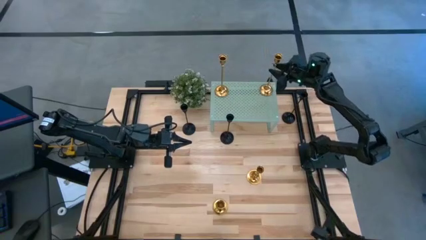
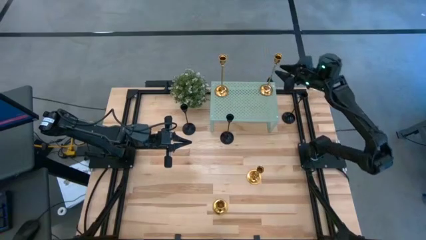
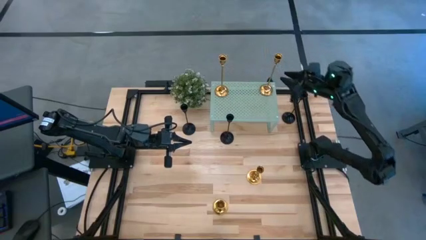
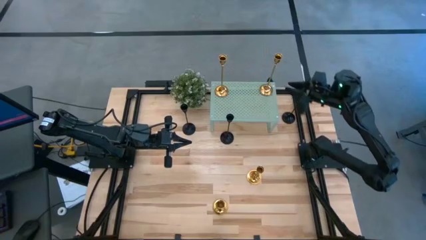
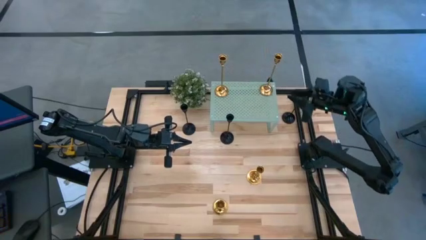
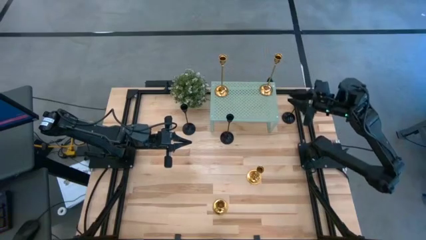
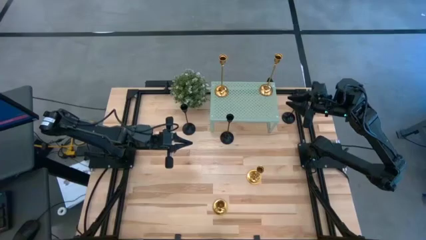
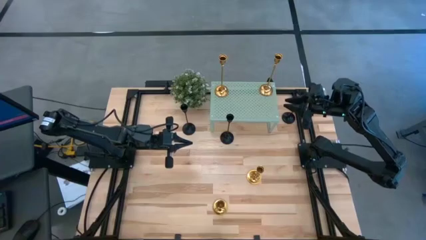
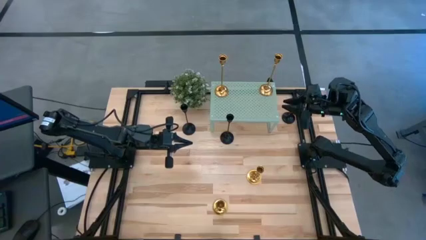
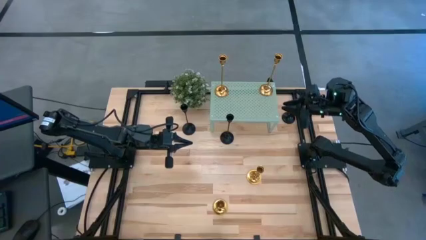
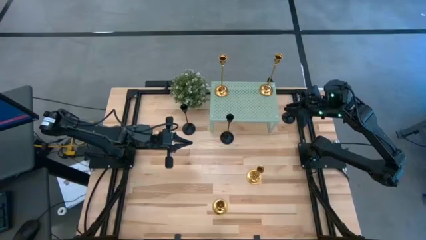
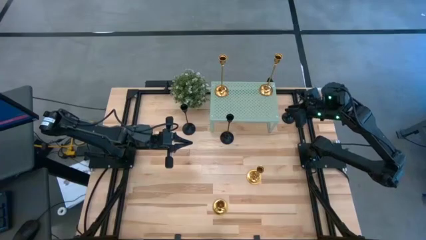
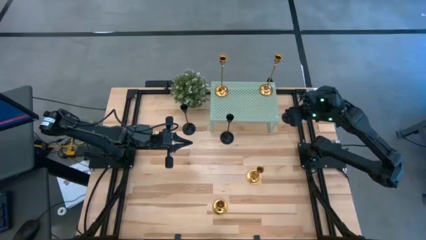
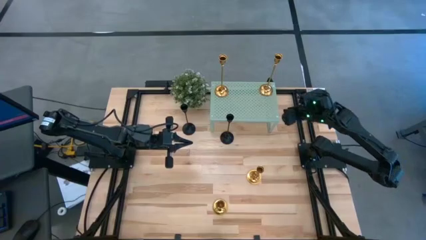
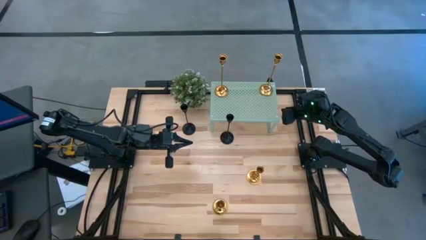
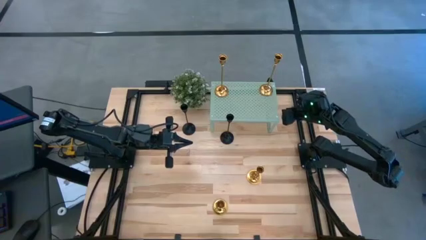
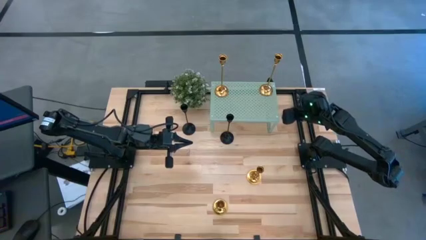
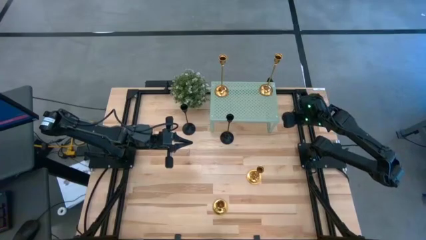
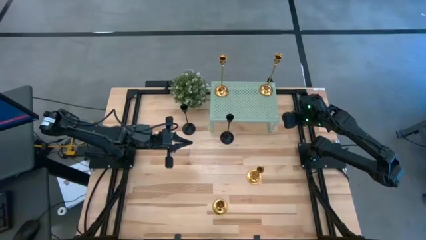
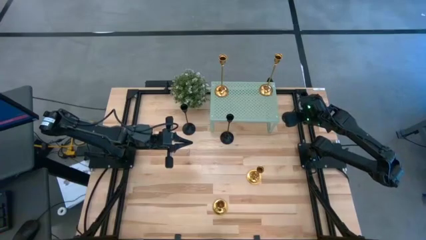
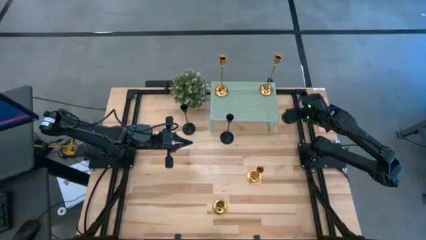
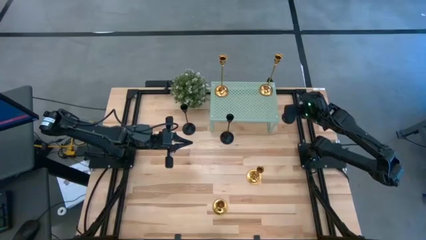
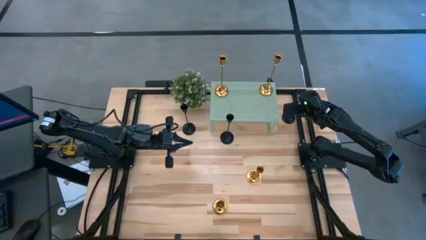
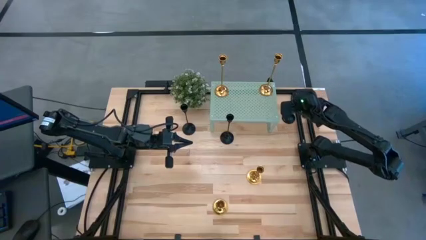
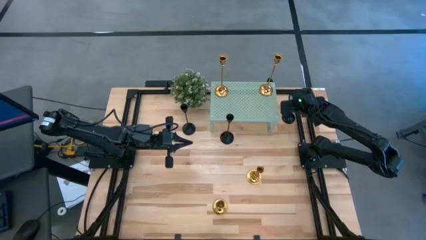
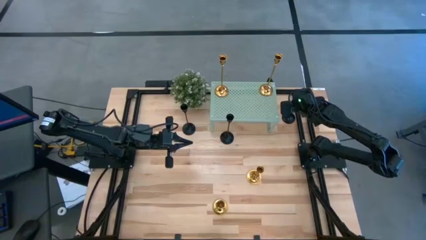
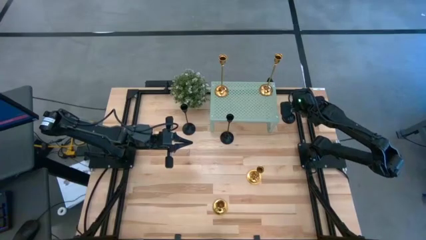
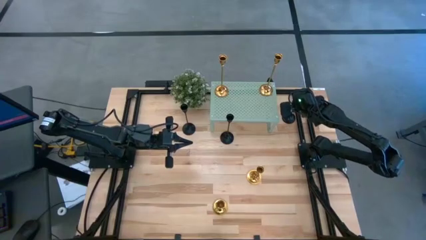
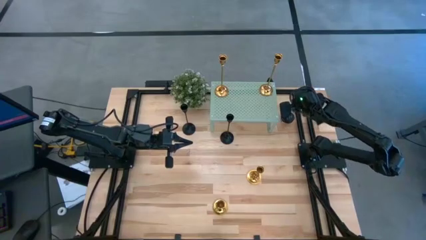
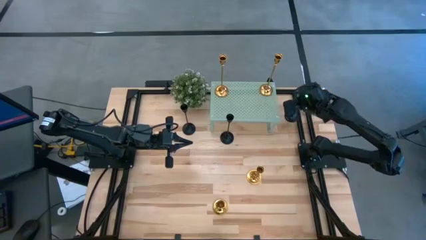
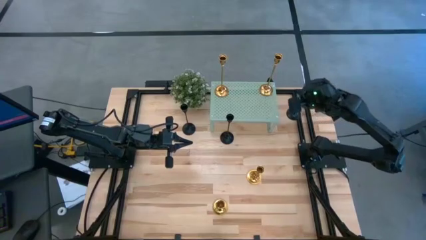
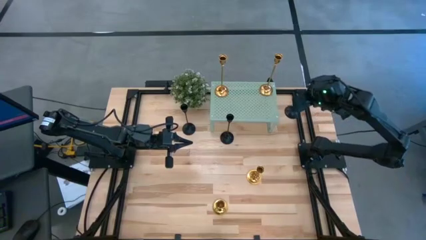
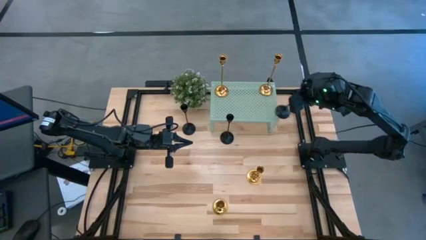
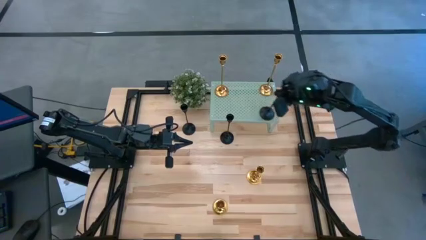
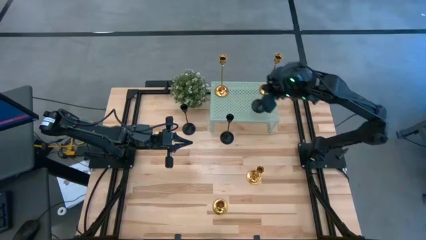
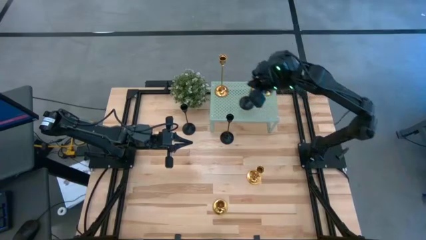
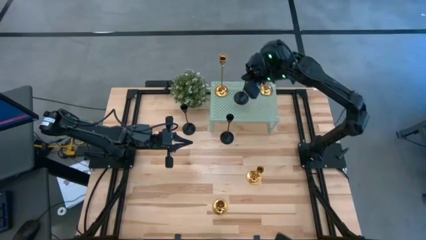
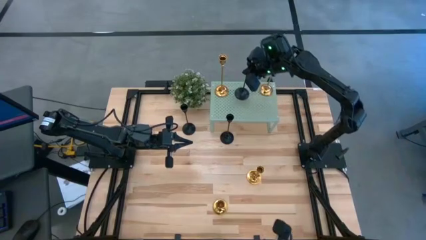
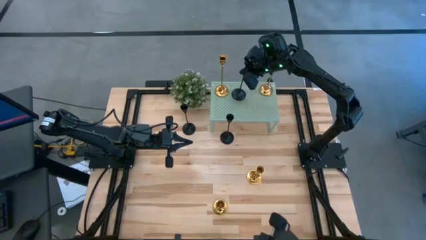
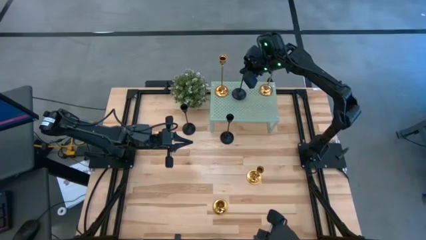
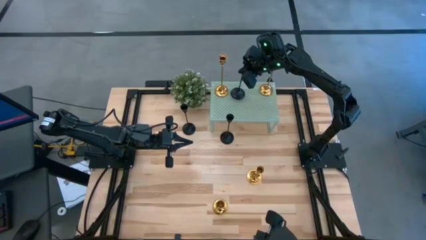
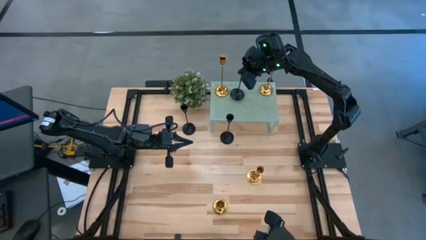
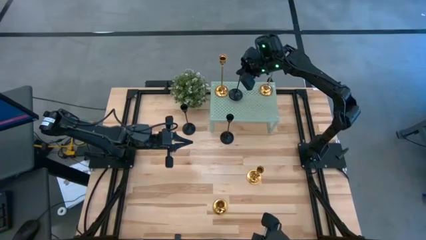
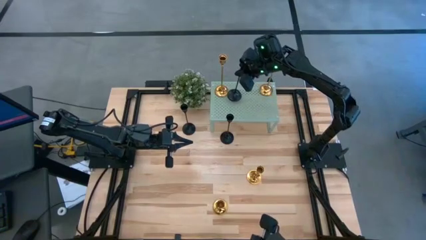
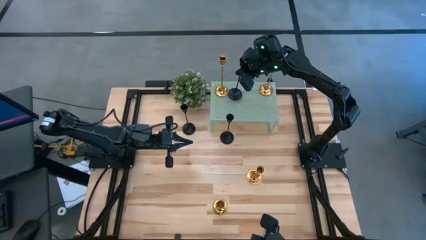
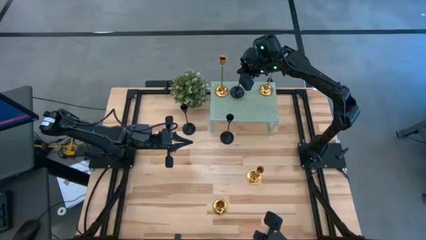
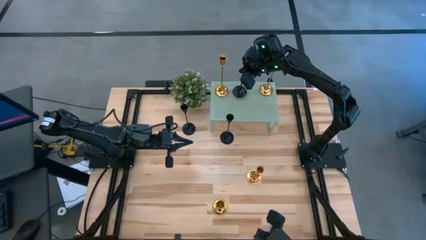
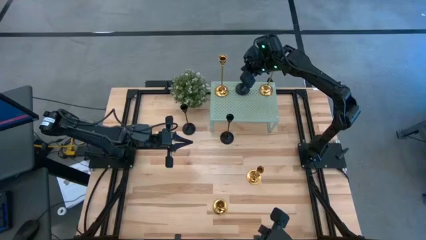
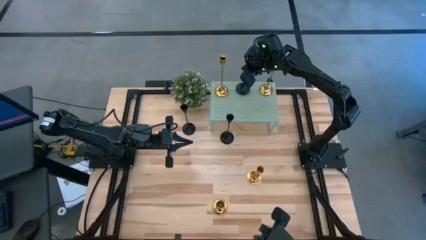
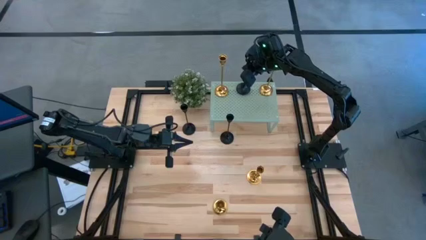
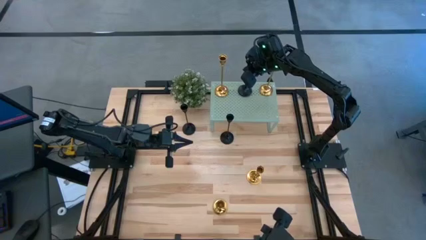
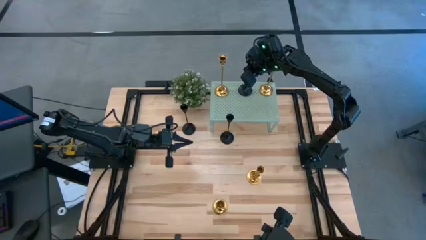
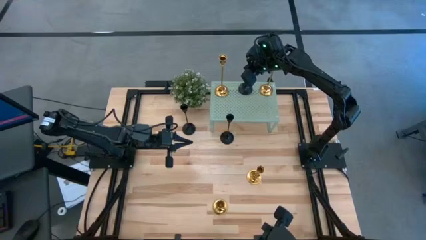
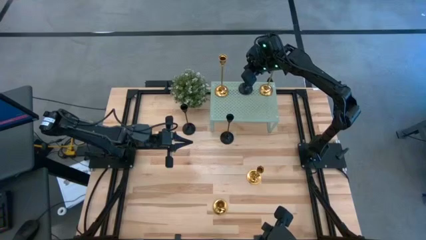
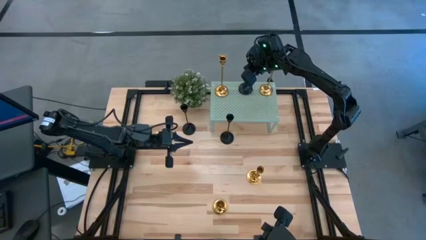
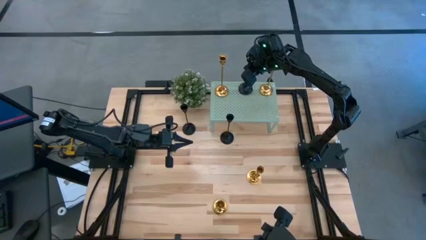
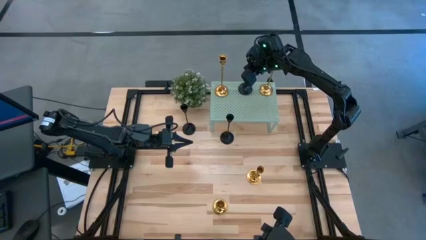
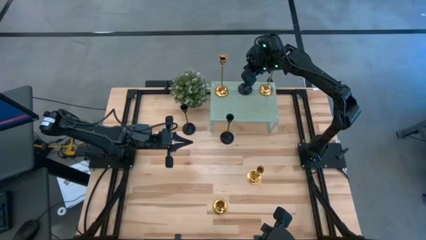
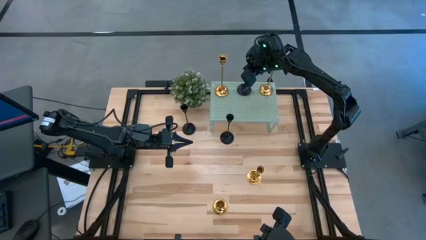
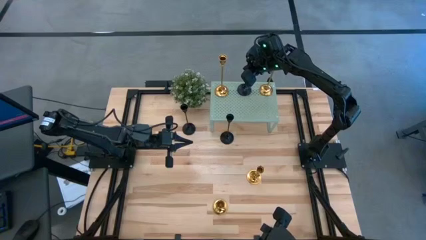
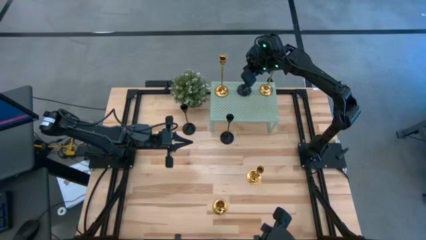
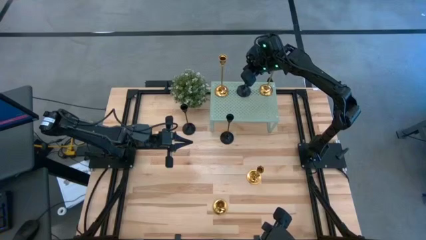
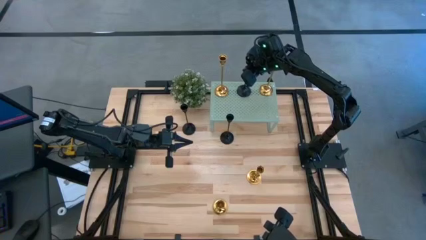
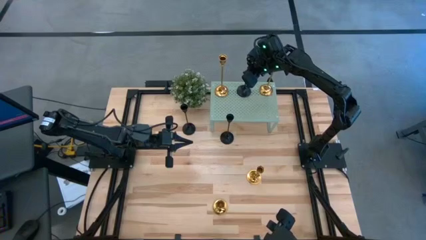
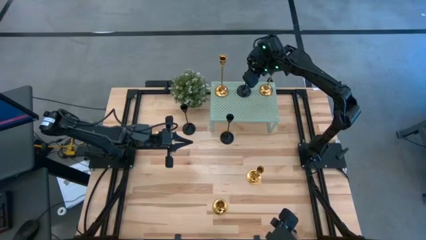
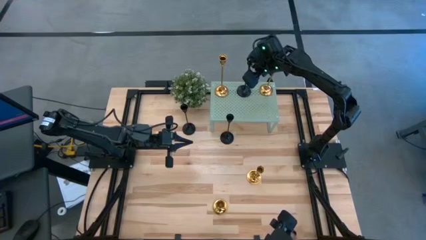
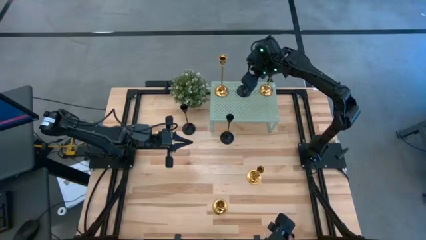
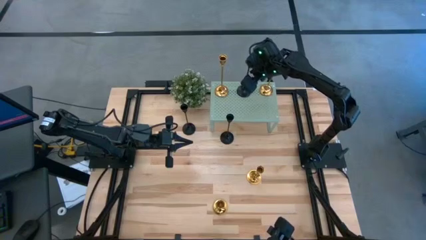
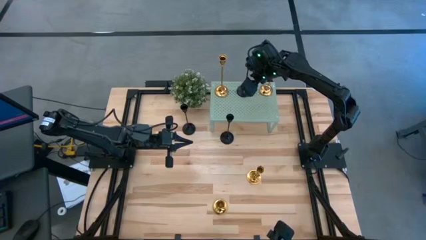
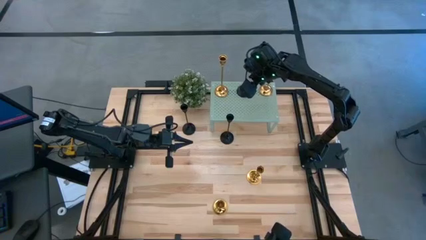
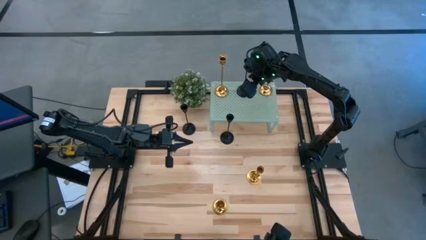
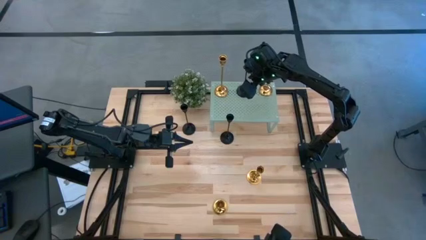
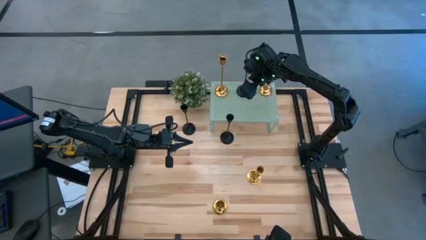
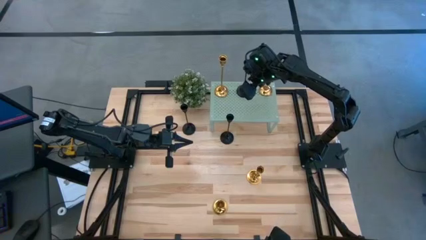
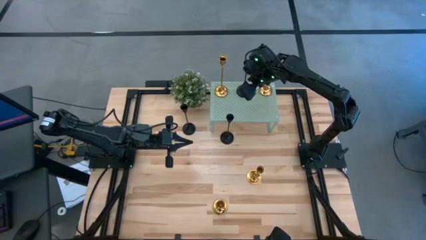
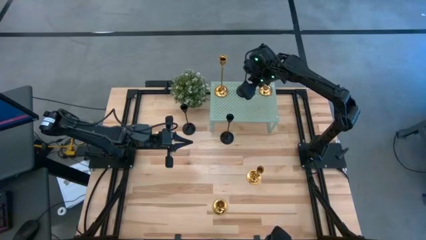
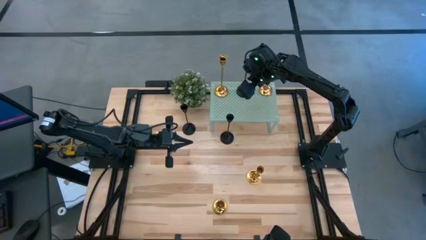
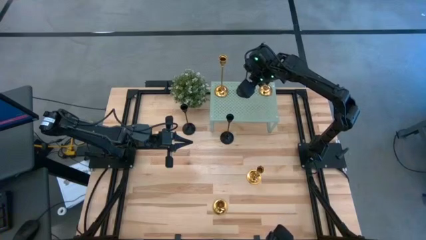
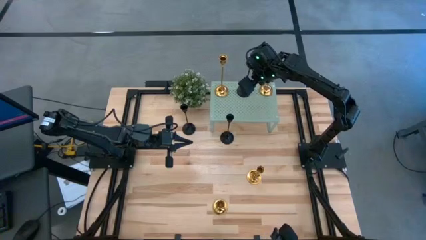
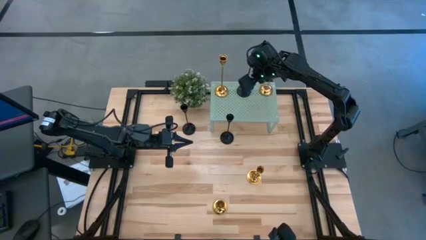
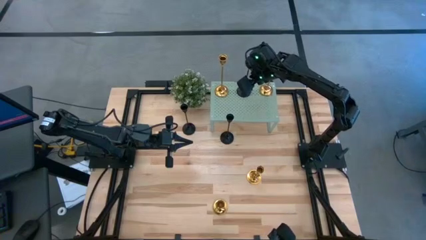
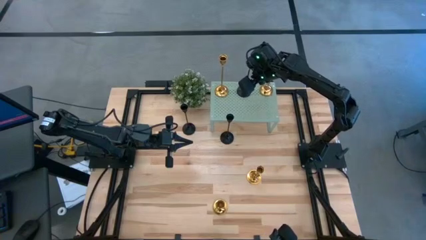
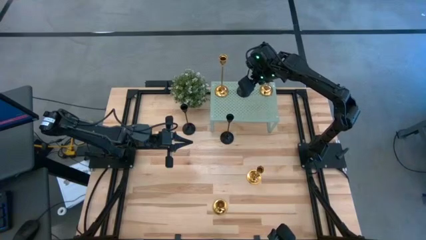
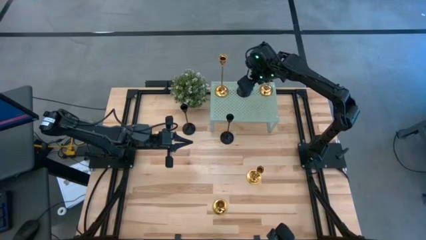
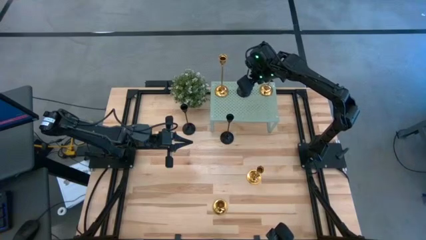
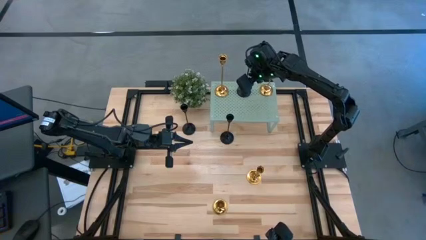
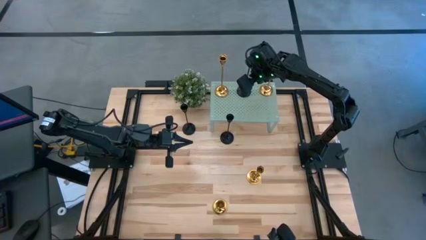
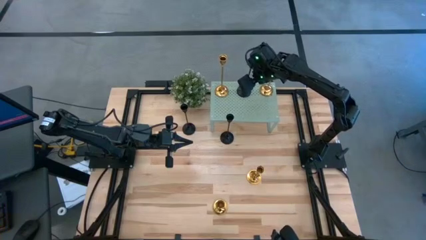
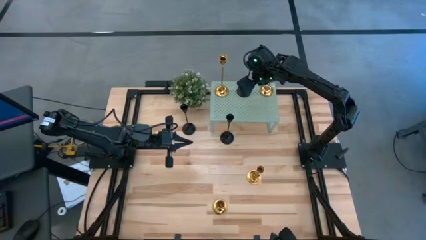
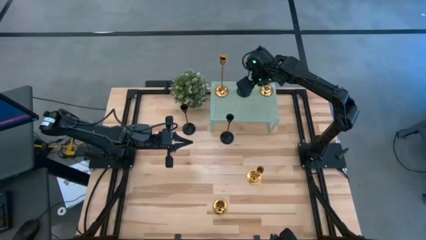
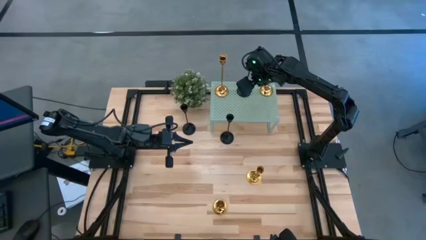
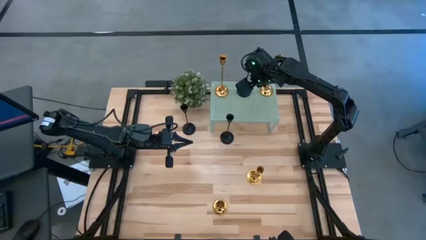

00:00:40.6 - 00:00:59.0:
Task: Pick & Place candle stick holders
Put the black candle holder on the shelf
